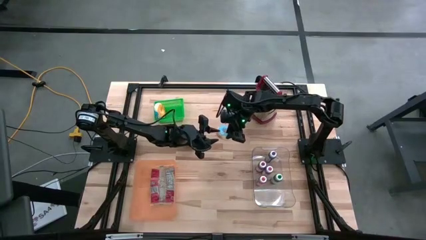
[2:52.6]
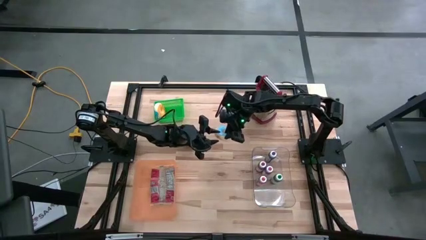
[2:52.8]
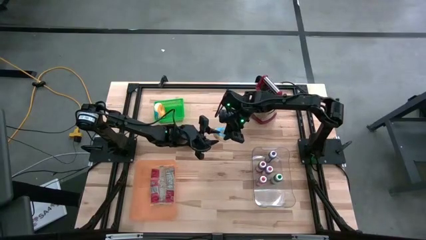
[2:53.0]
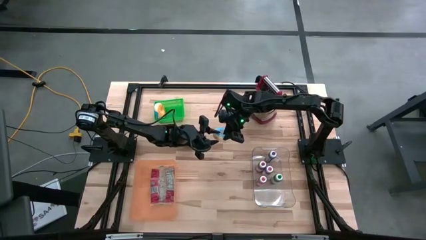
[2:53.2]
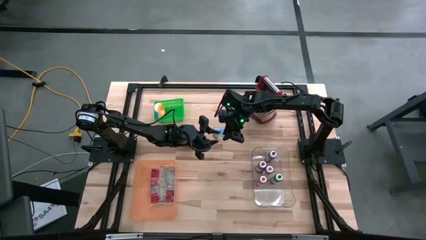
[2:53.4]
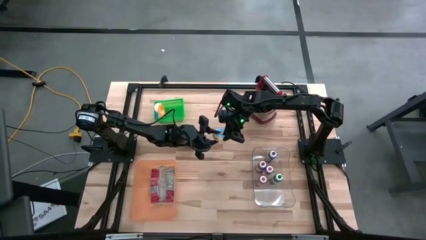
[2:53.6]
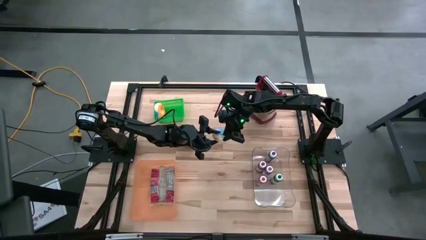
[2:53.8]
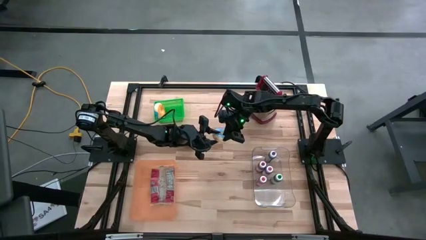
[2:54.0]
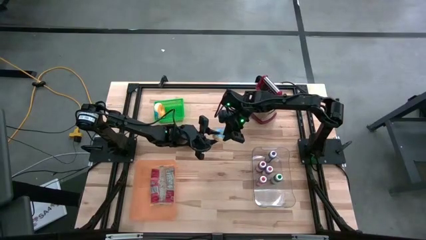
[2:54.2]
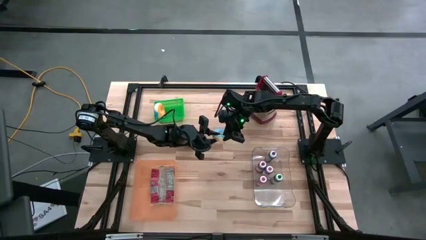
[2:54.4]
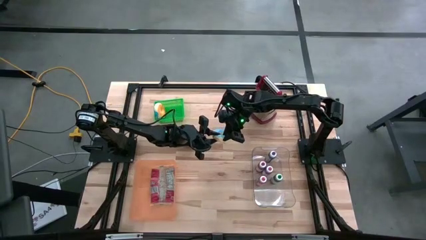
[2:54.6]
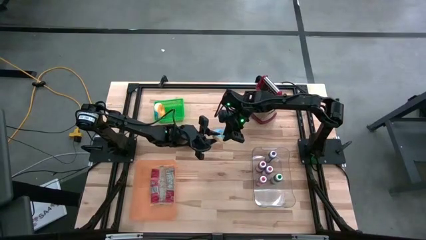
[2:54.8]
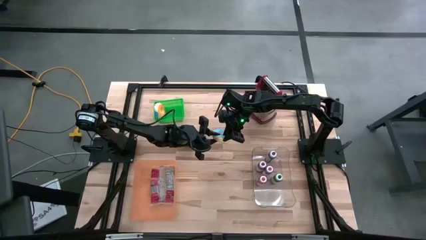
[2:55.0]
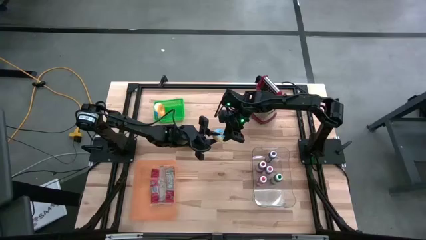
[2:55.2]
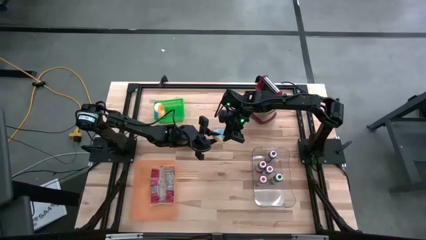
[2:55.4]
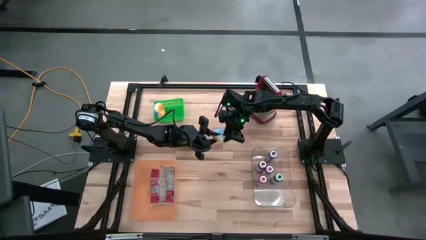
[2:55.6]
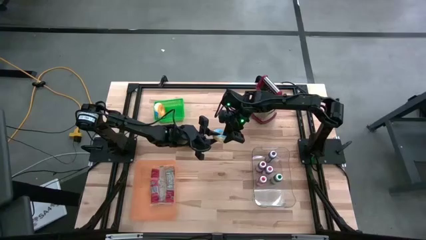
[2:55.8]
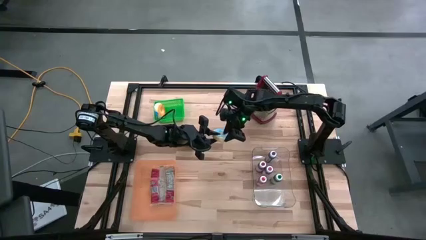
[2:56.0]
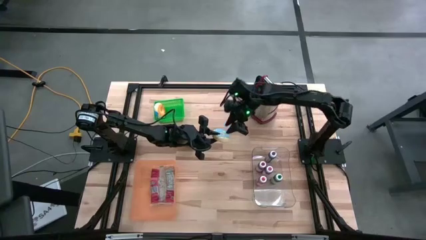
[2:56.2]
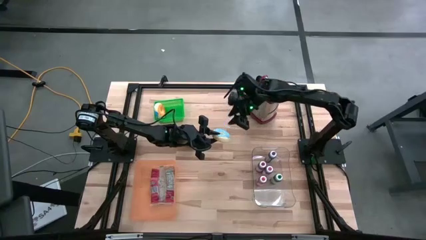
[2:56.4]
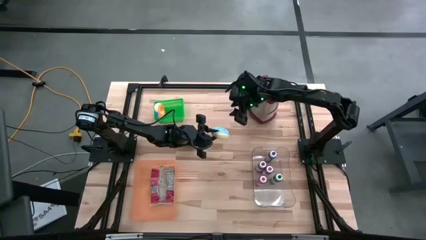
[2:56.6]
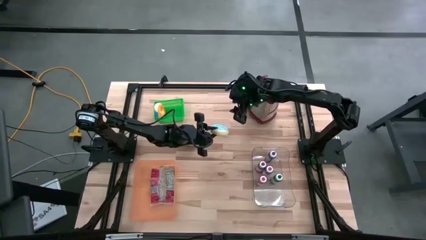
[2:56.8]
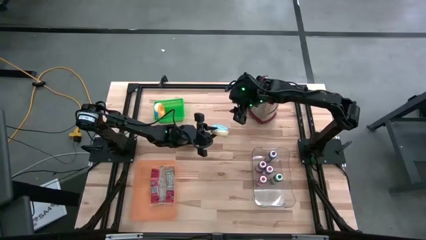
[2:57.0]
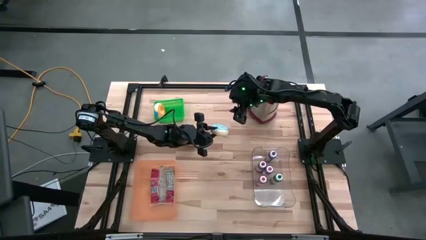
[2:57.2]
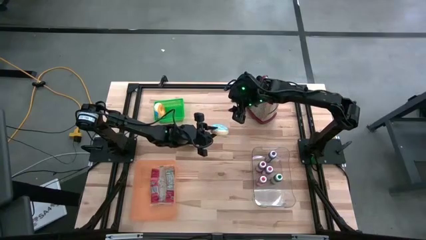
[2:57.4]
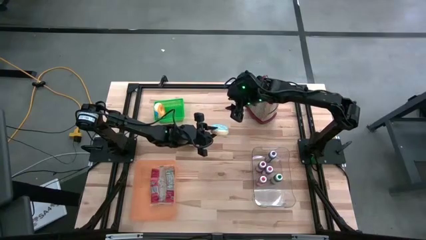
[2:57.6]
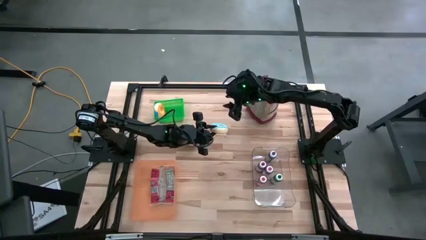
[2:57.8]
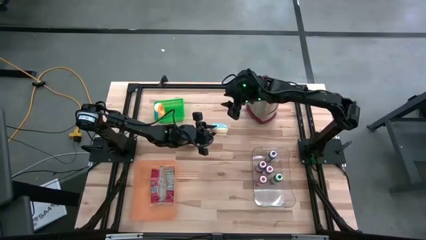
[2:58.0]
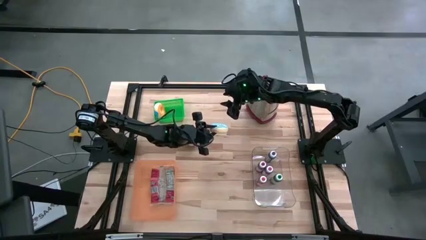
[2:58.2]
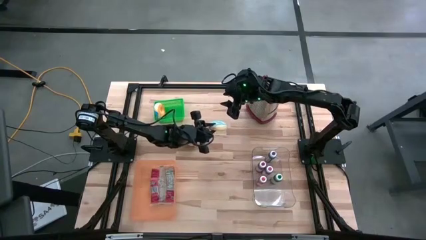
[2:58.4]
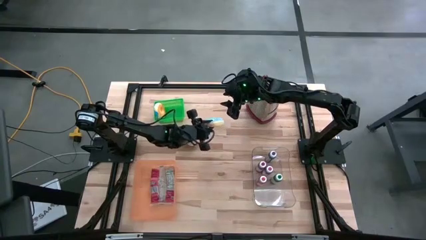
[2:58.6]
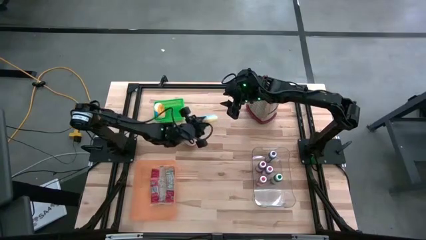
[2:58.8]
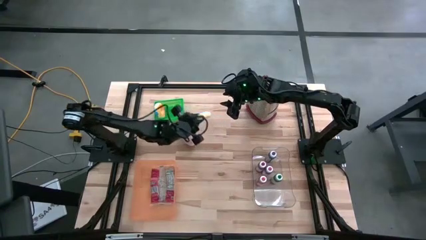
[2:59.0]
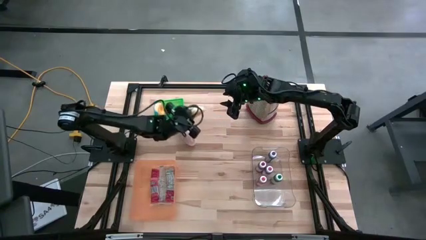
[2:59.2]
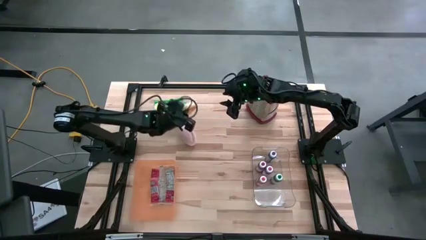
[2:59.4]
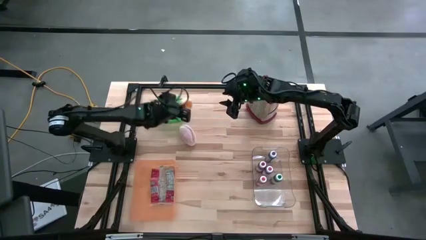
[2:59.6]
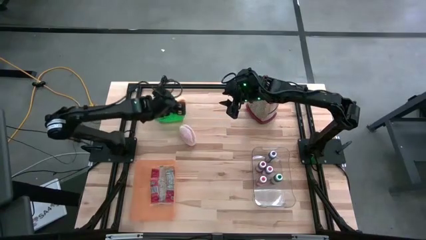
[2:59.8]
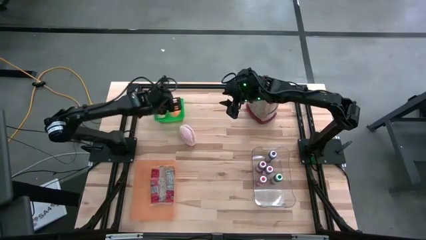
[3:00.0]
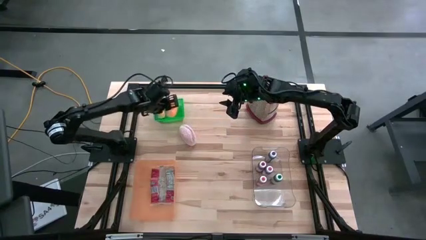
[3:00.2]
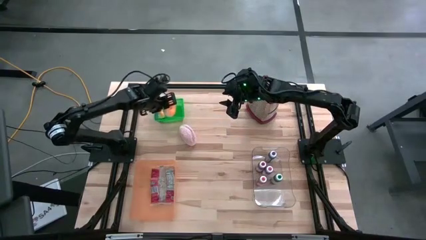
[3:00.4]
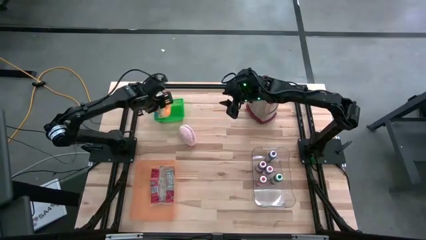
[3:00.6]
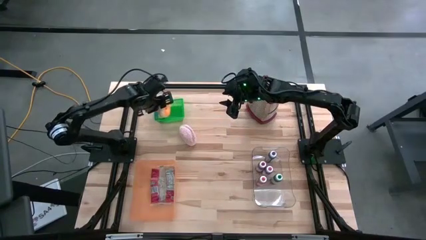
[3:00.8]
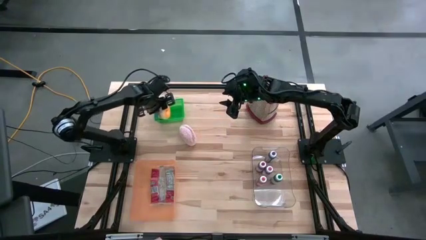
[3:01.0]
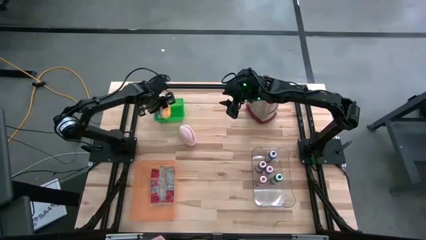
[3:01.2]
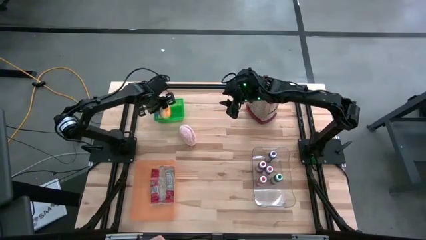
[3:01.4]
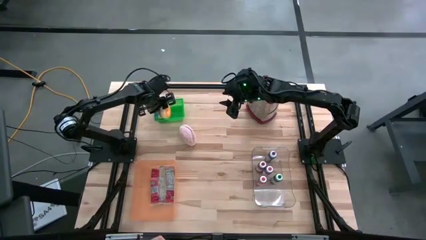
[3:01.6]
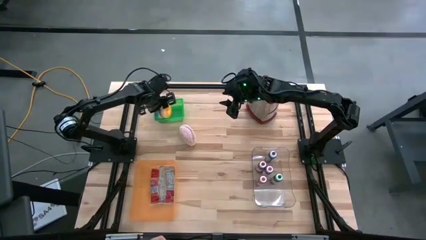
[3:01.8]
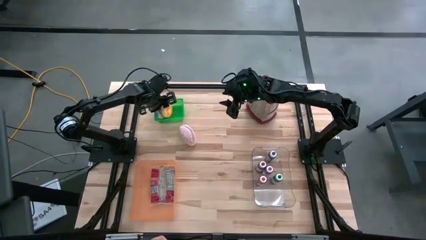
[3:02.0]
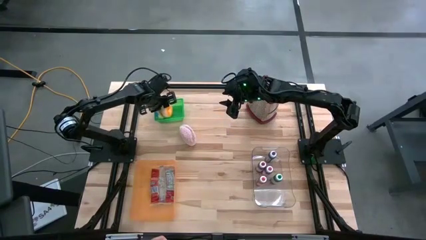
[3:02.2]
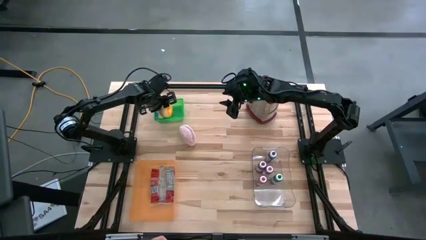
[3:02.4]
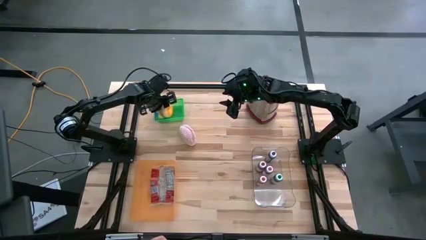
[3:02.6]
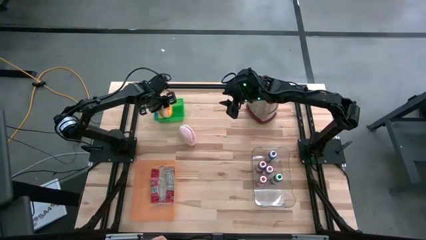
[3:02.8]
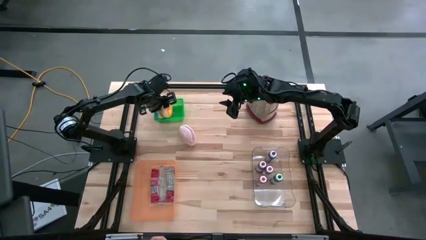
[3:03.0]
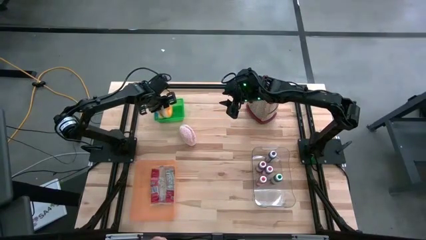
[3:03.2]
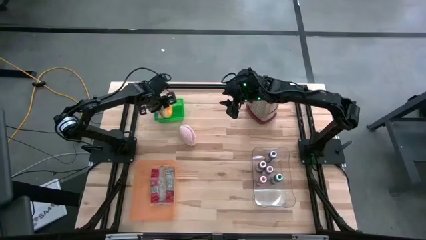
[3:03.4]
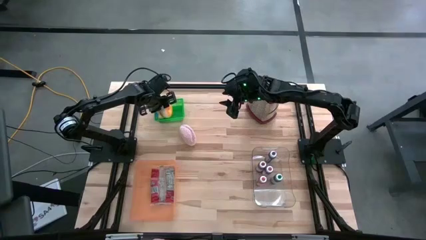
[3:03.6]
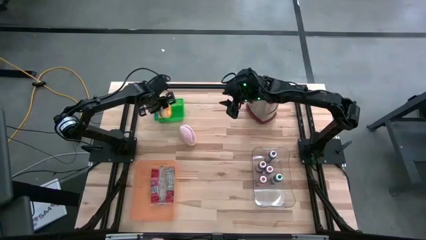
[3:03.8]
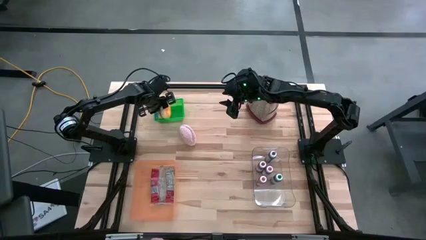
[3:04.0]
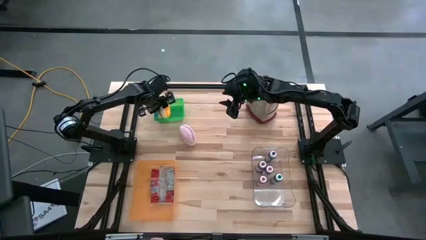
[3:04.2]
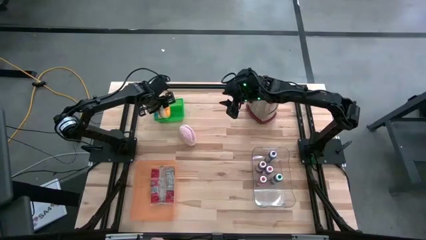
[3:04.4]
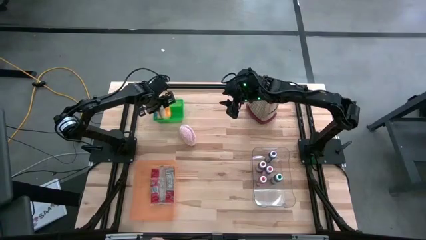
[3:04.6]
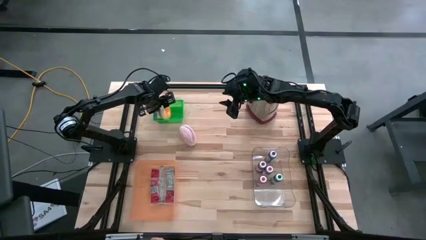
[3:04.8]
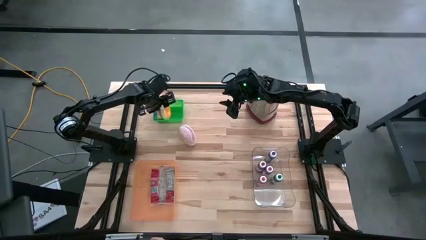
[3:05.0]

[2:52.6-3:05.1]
Put the light blue donut into the green basket
